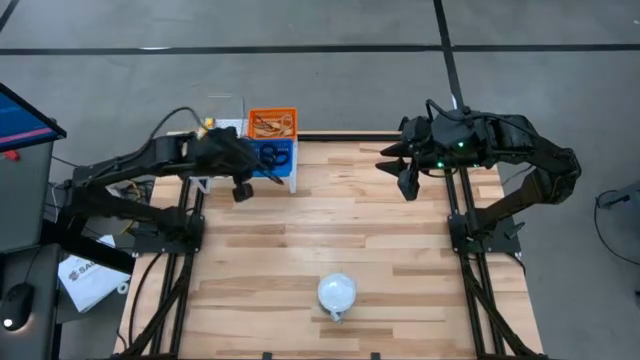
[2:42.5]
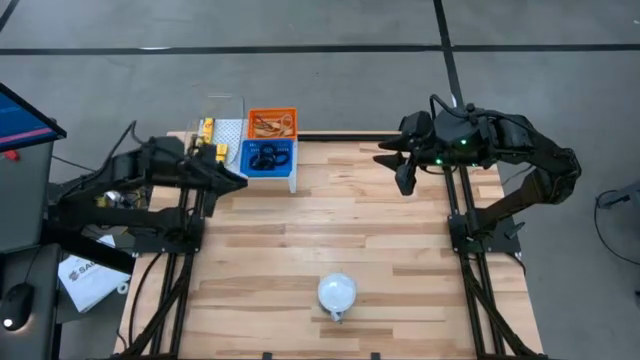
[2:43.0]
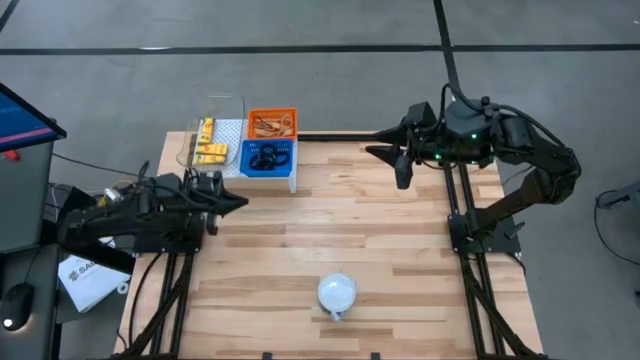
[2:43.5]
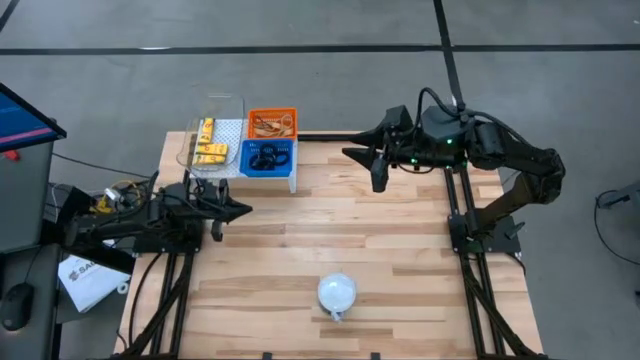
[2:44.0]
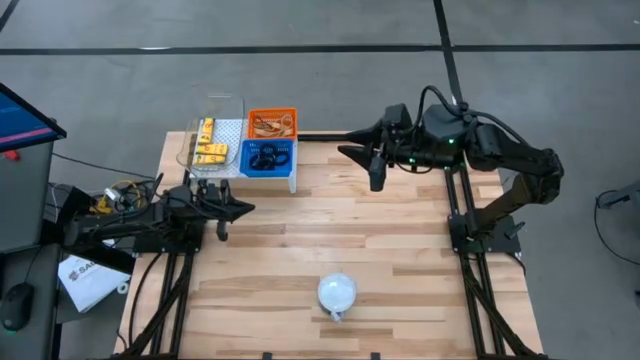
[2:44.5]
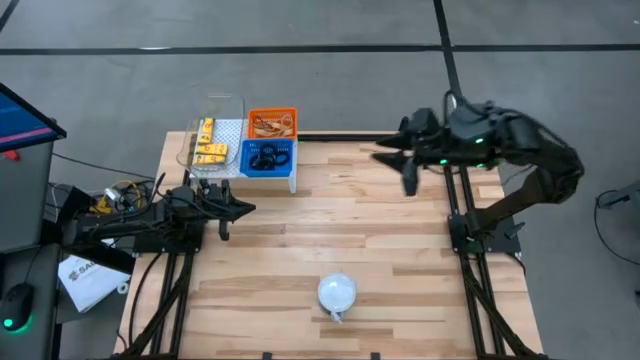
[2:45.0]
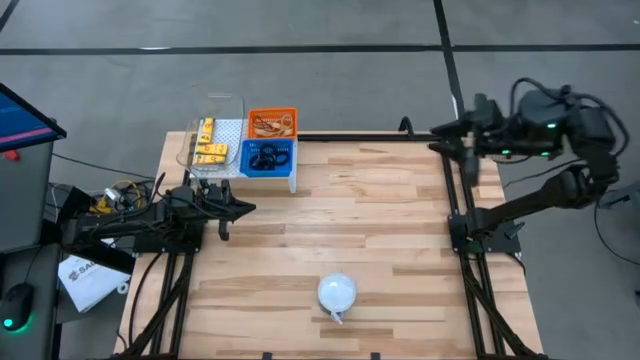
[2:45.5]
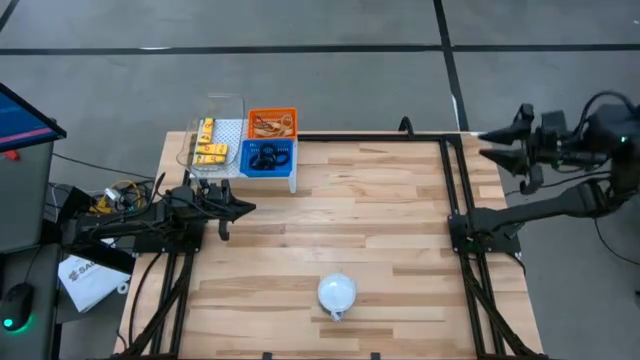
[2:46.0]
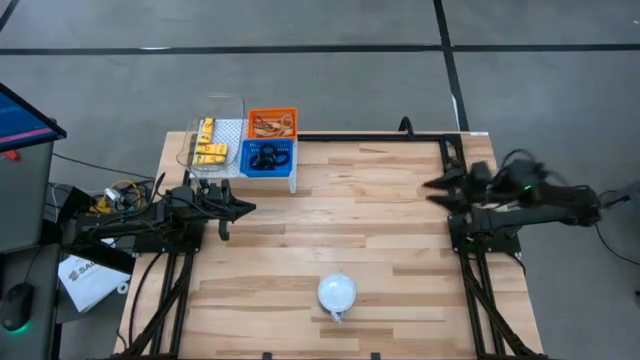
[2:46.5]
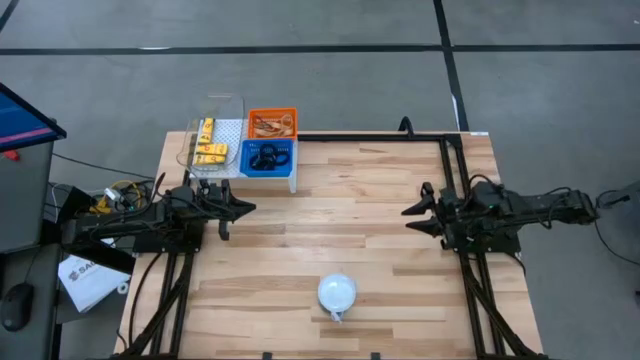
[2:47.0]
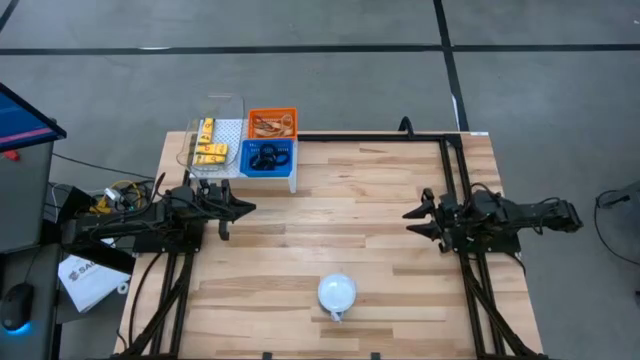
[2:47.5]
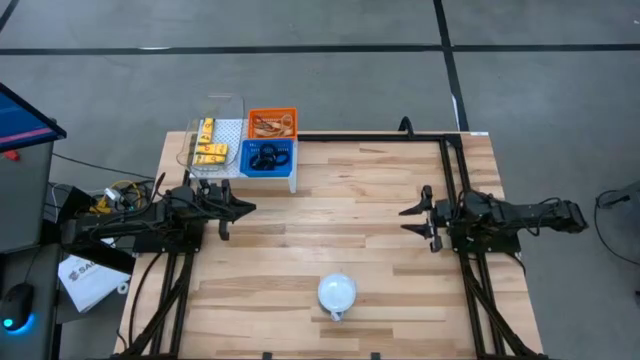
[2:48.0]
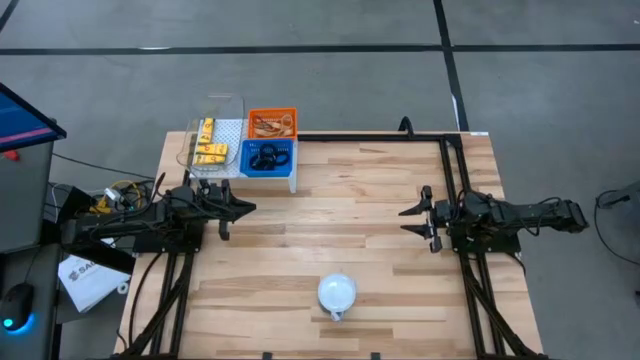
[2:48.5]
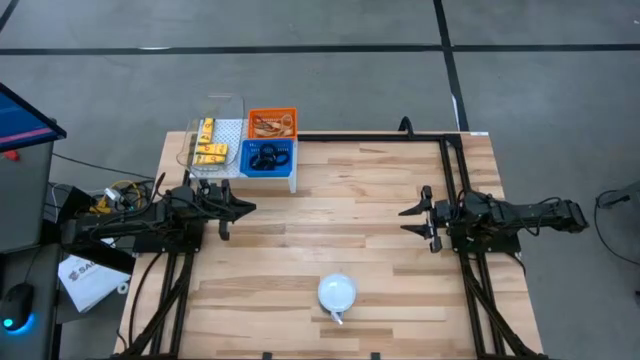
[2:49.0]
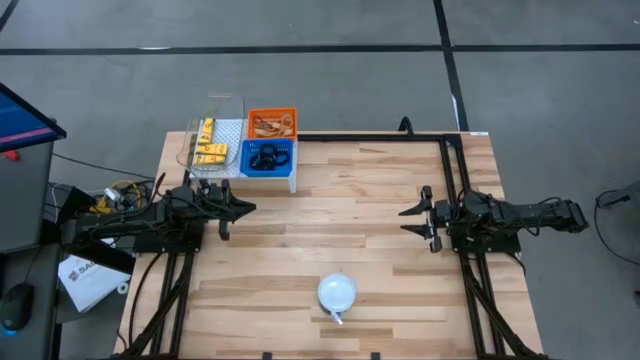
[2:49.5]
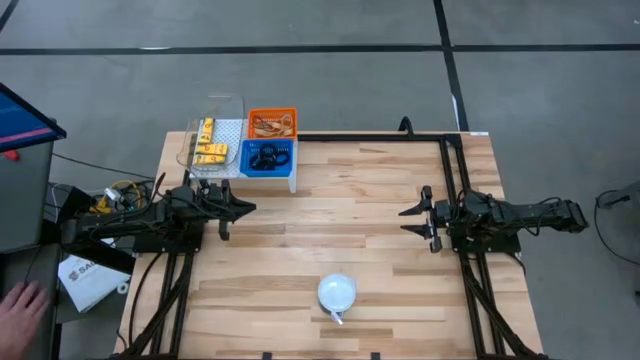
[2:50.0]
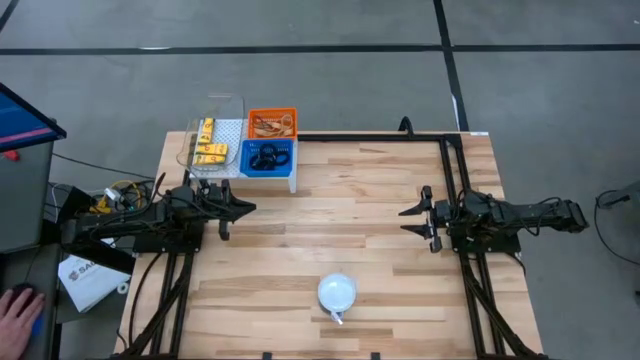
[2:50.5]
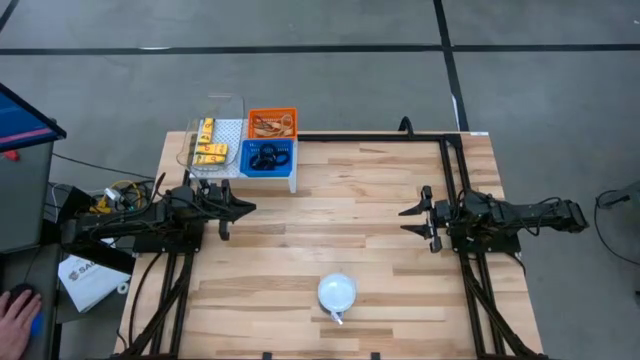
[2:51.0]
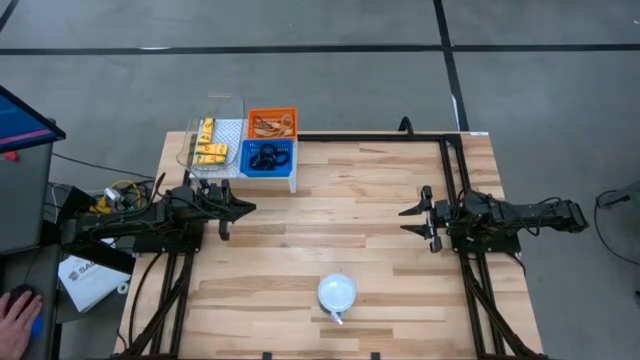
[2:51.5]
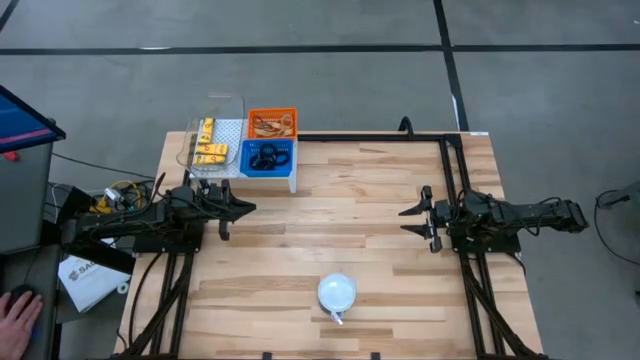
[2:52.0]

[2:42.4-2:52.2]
Task: Pick & Place Office Desk Supplies
Return to Home Position

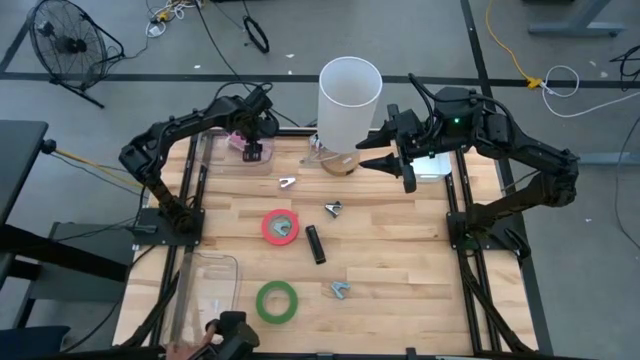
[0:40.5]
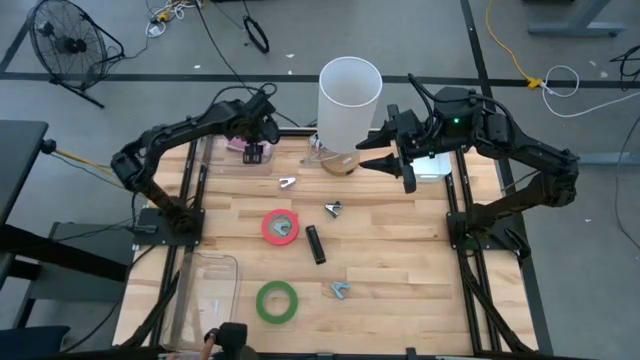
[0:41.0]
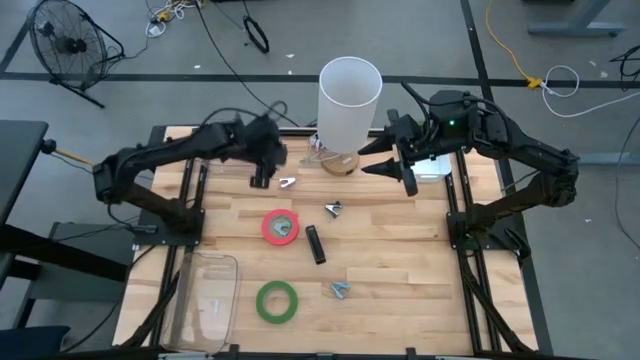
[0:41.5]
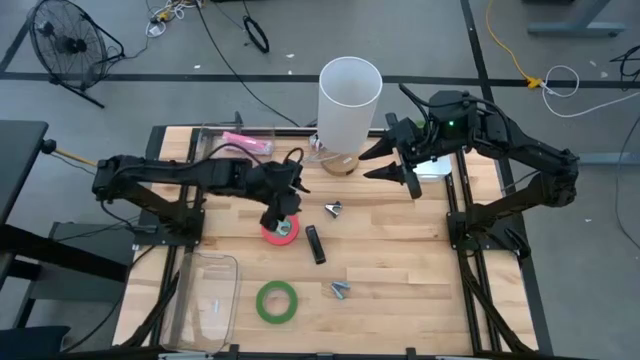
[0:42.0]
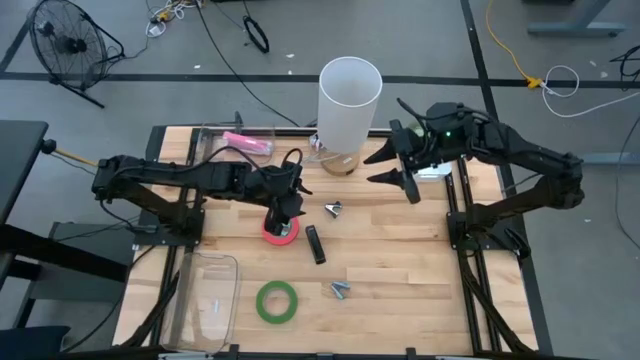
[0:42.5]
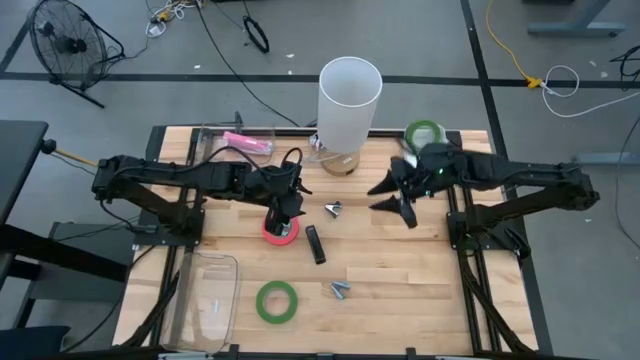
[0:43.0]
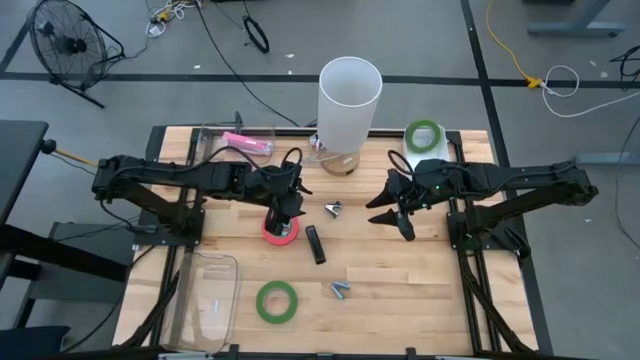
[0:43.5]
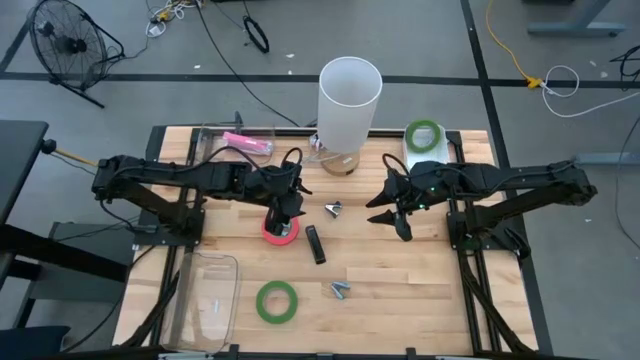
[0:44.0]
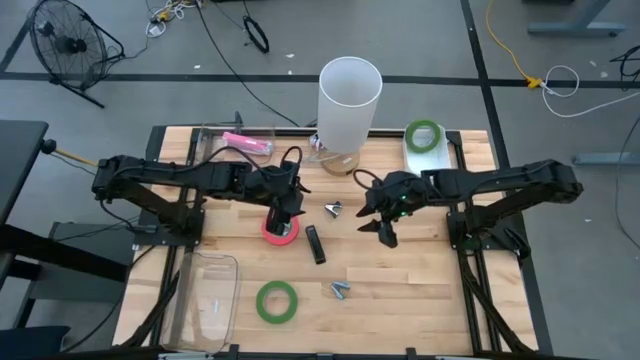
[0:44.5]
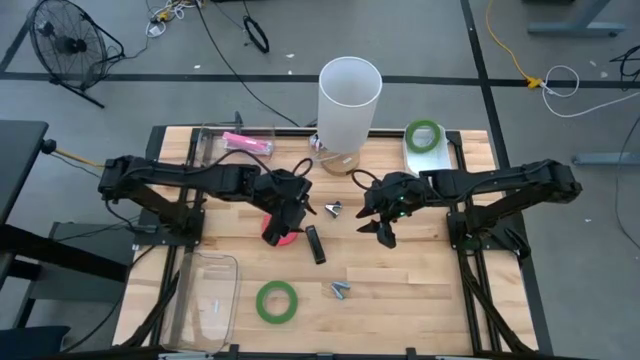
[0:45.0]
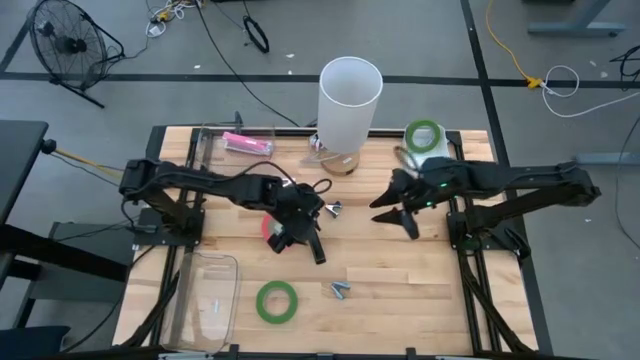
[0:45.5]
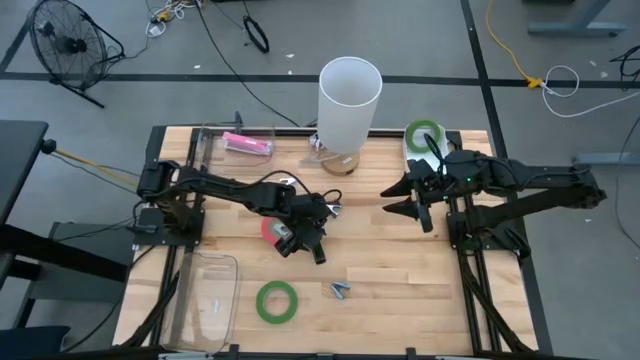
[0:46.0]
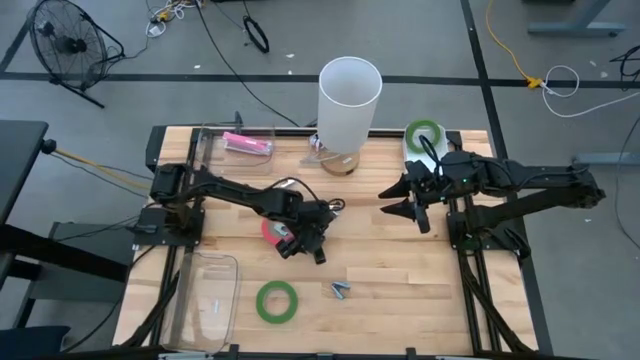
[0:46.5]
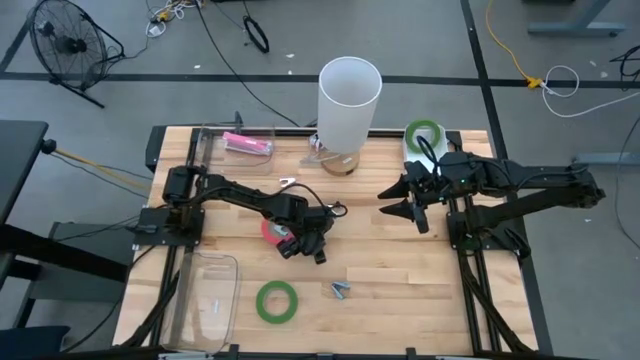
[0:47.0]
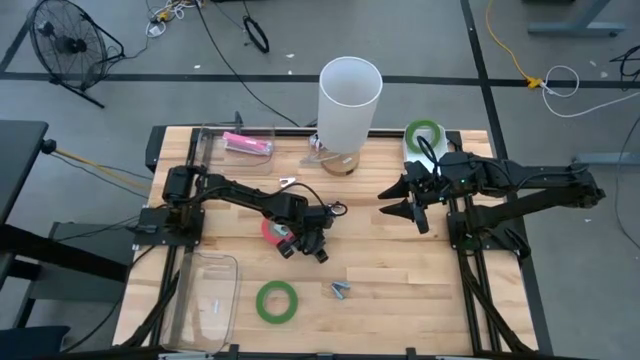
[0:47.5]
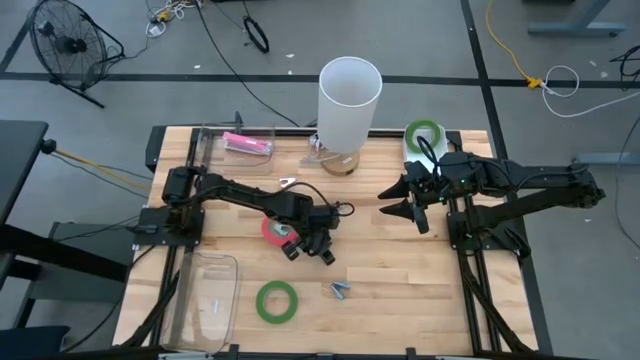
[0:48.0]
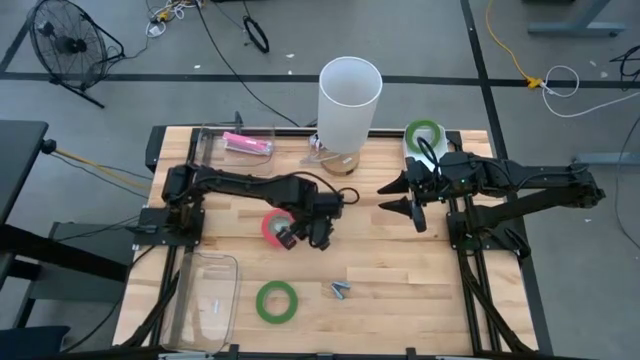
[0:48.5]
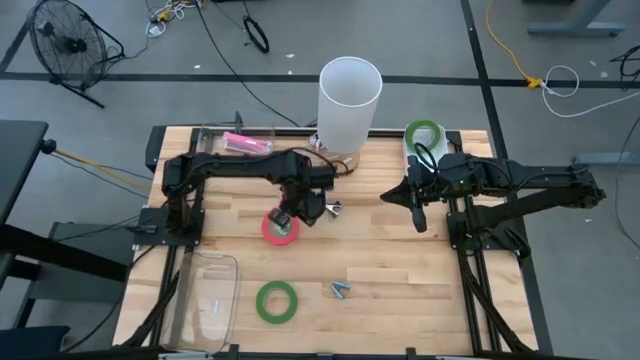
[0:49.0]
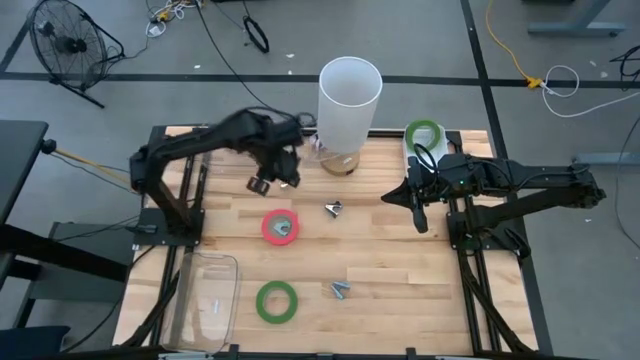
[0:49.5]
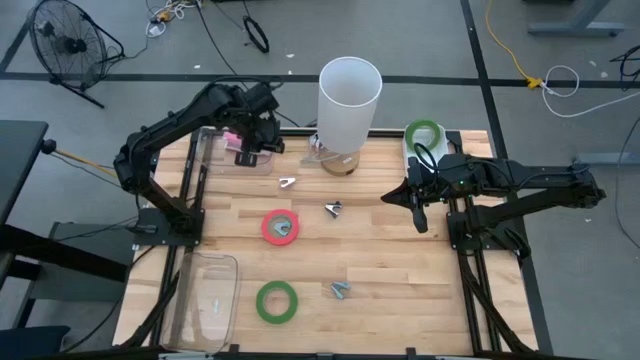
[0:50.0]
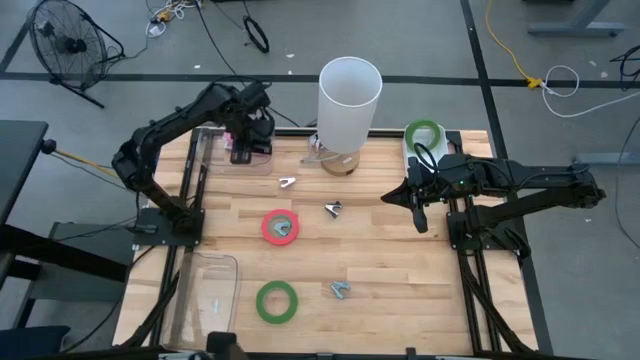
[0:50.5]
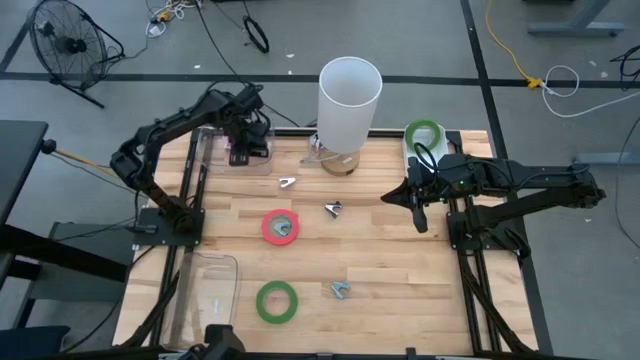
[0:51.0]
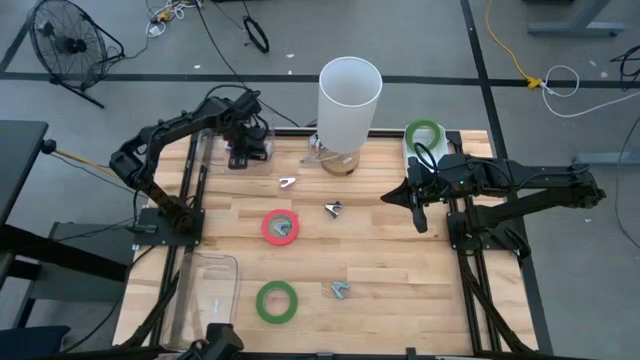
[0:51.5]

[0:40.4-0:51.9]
Task: Pick and place Stapler, Stapler remover, tape
Put the black stapler into the top transparent bin
